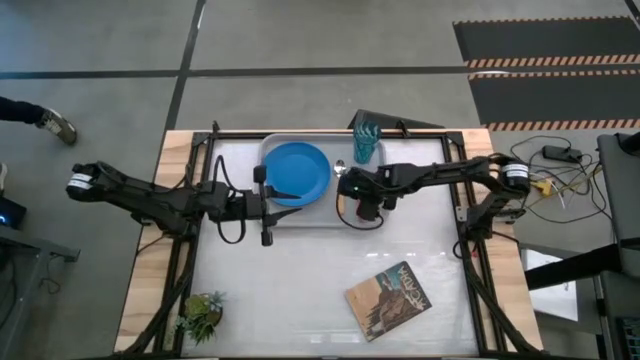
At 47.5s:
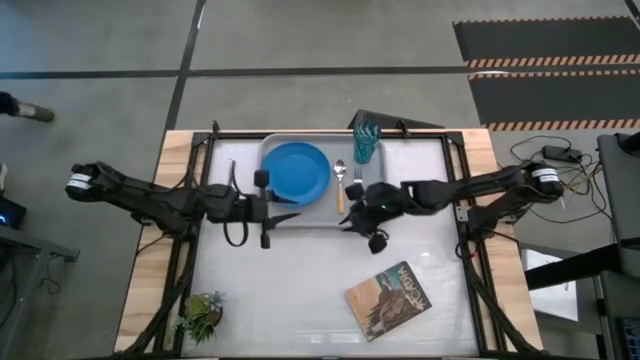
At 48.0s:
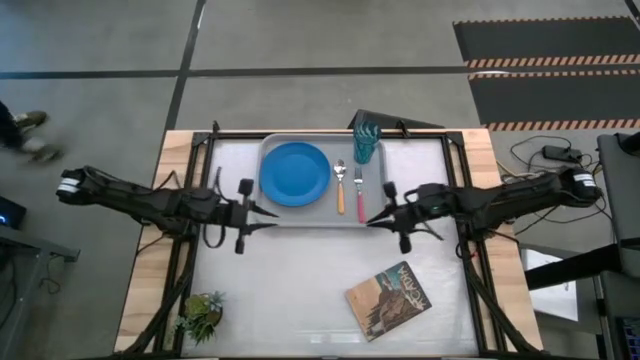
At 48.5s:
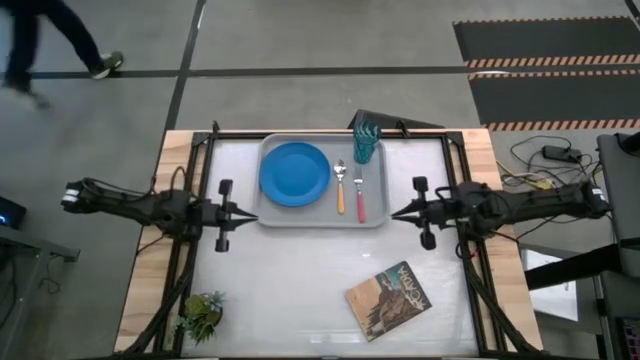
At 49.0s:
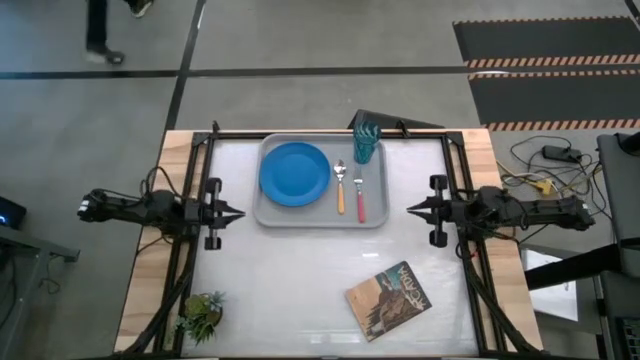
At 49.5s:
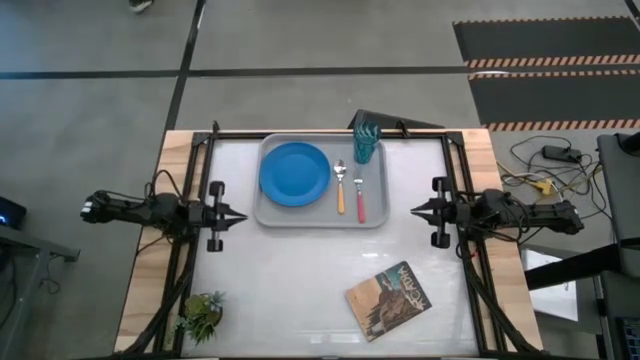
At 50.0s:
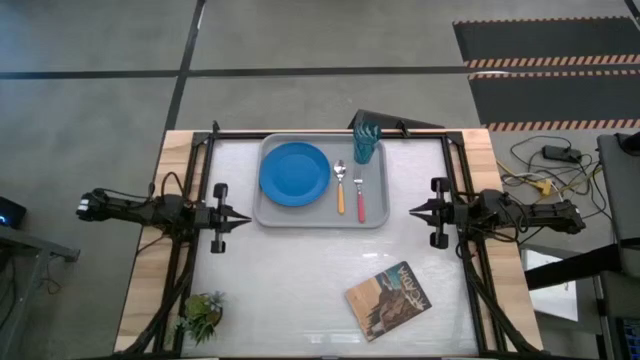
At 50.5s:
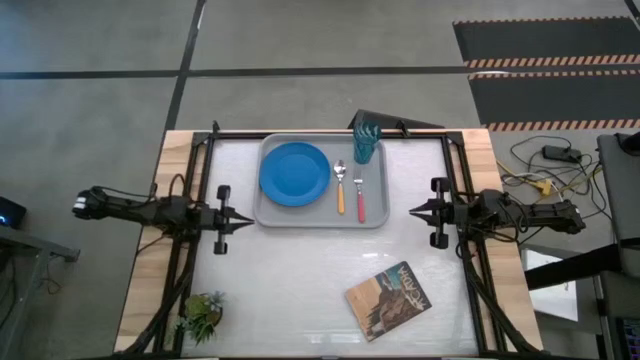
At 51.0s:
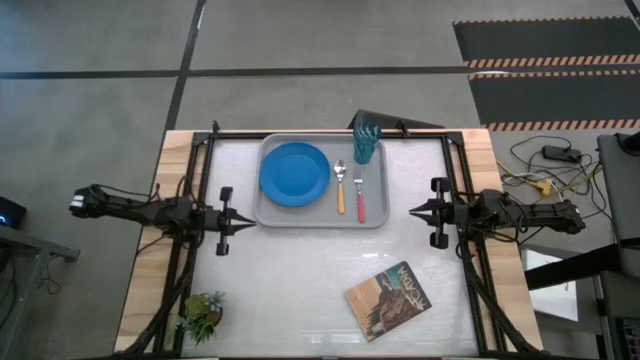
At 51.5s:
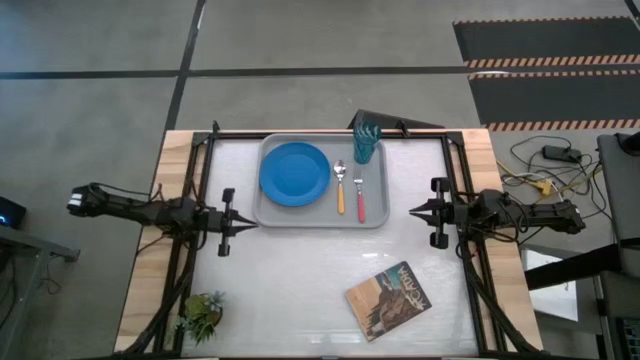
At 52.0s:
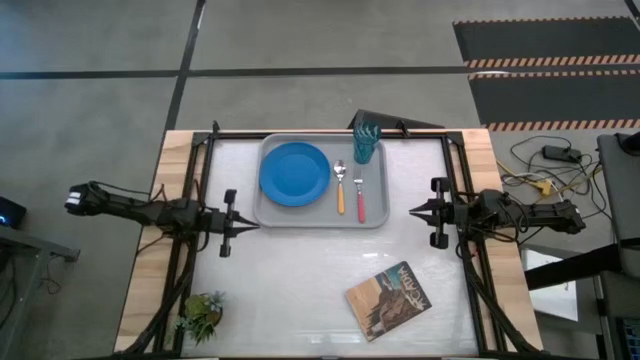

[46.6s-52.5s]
Task: Pick and place plate/cup/fork/spoon on tray
Return to Home Position
